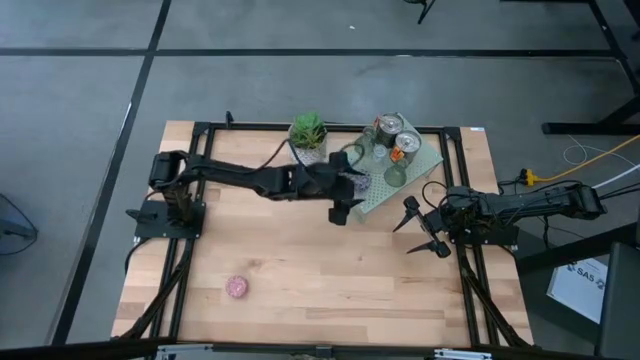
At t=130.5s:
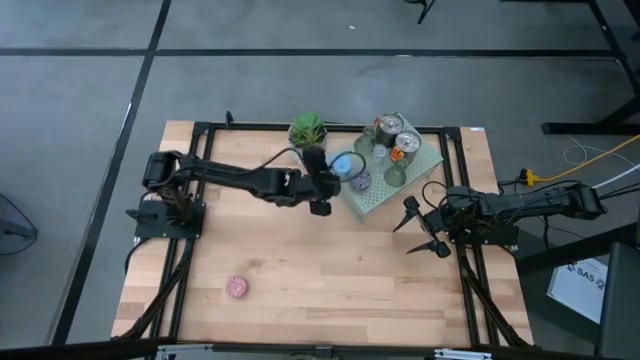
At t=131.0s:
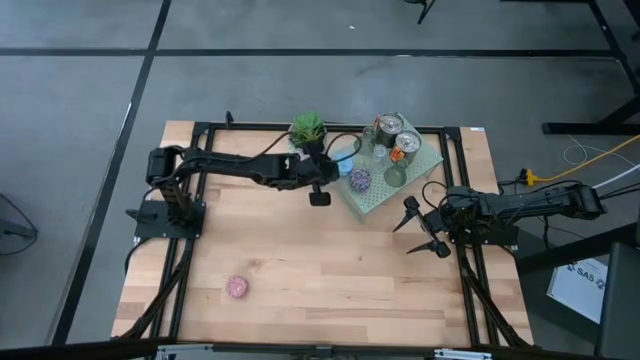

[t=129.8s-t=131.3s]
Task: Pick & Place candle stick holders
Adjust the blue scented candle on the shelf

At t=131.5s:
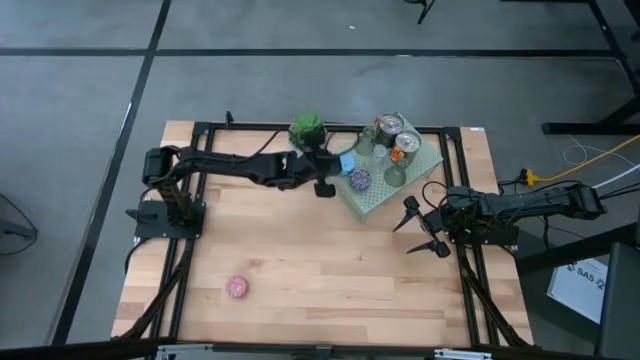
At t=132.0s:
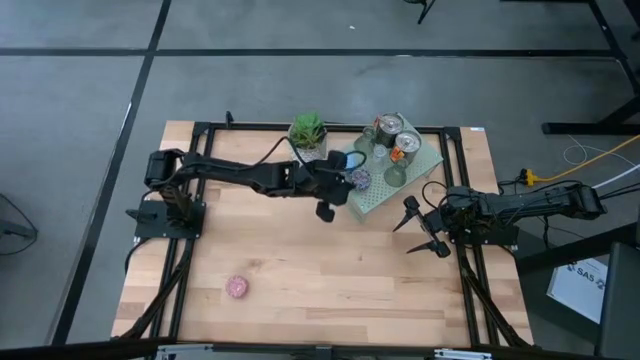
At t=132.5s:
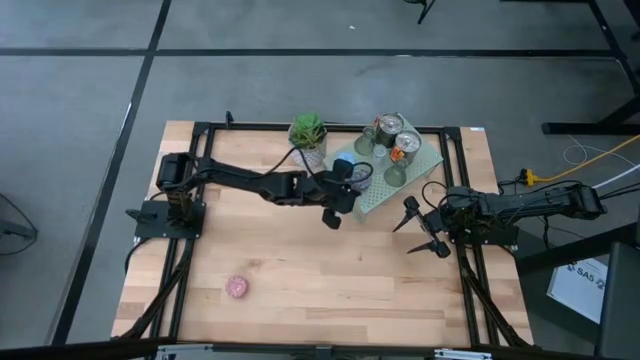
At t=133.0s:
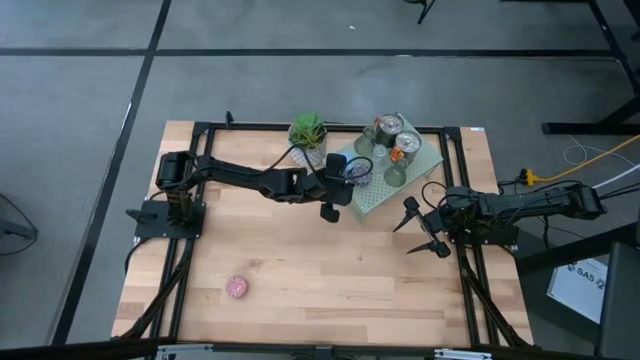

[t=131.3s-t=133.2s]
Adjust the black and red scented candle on the shelf

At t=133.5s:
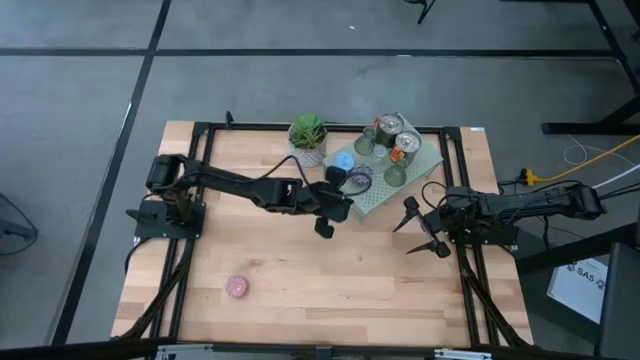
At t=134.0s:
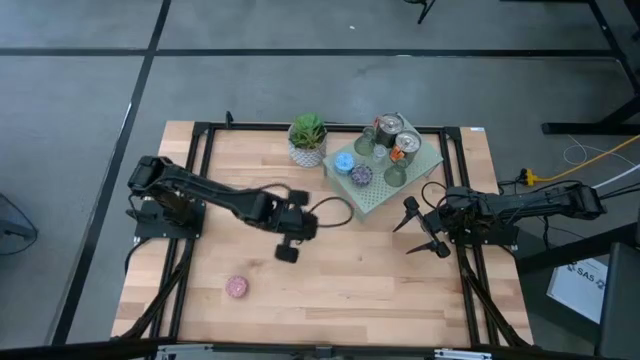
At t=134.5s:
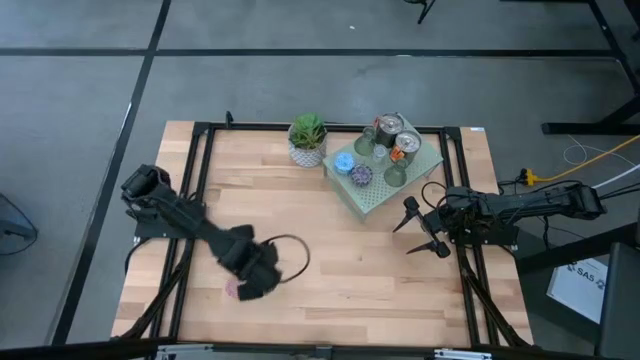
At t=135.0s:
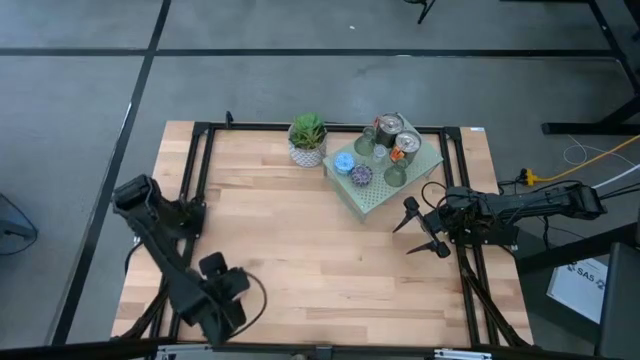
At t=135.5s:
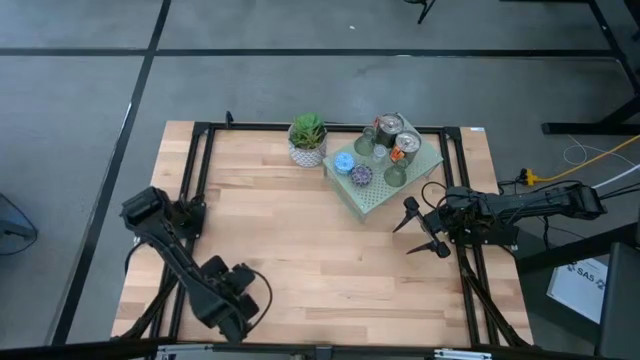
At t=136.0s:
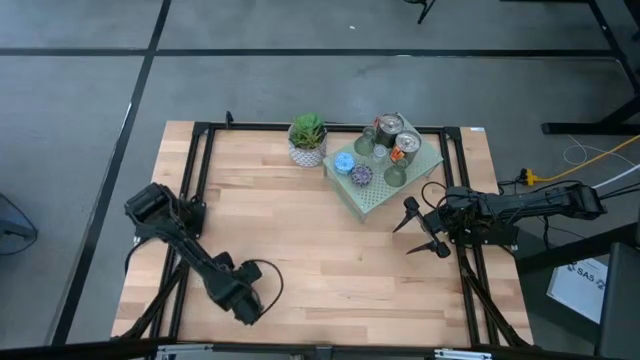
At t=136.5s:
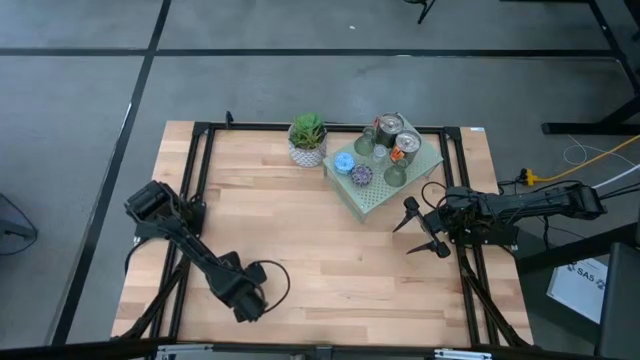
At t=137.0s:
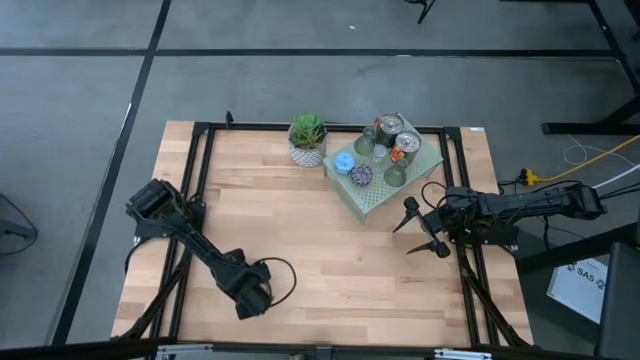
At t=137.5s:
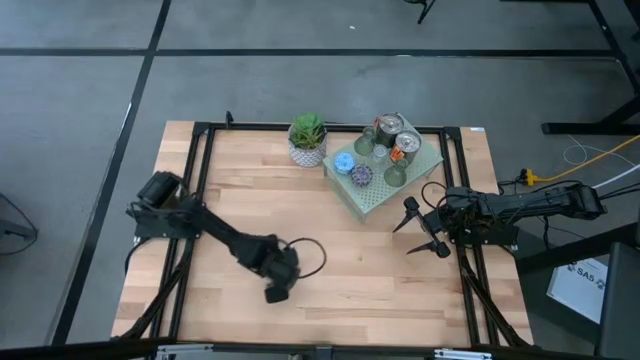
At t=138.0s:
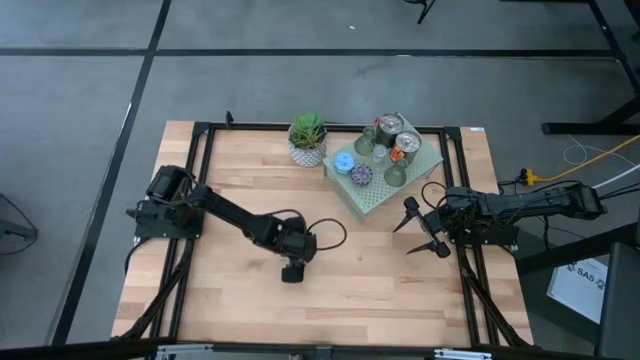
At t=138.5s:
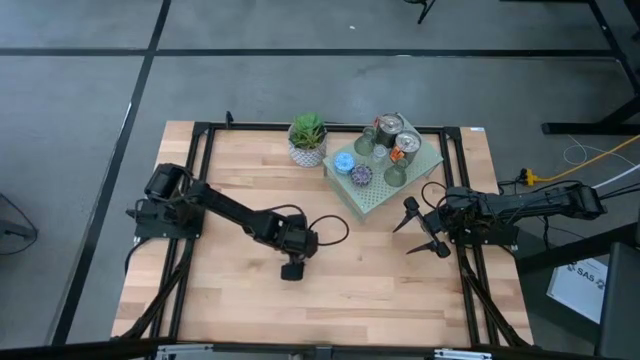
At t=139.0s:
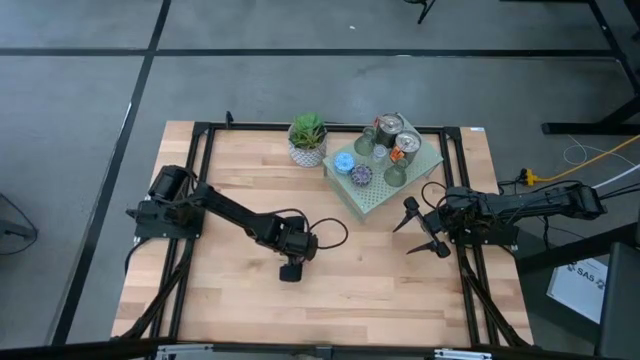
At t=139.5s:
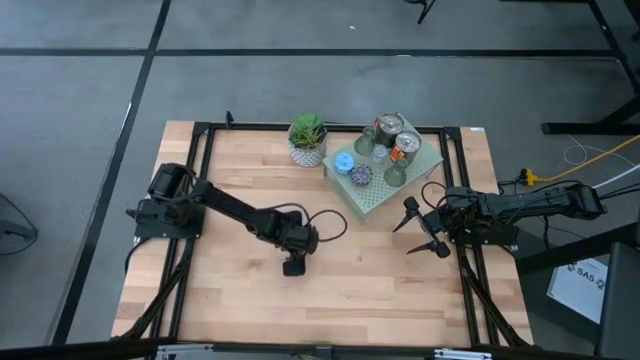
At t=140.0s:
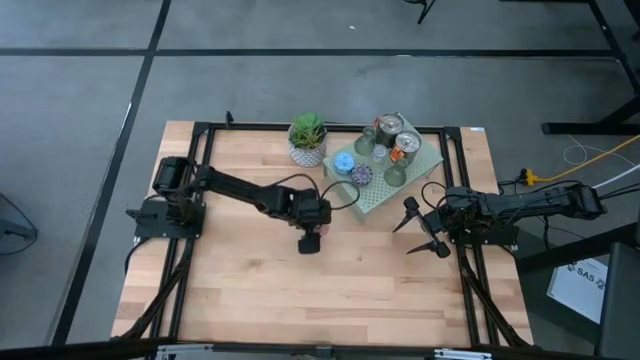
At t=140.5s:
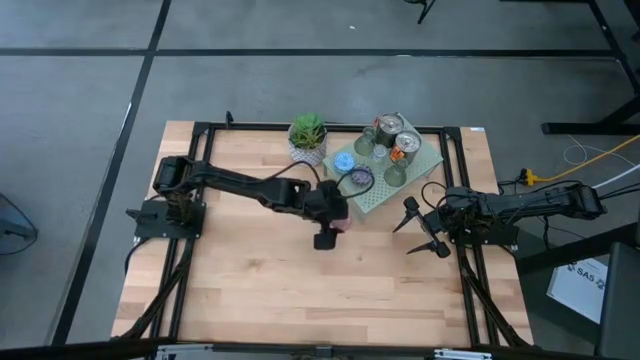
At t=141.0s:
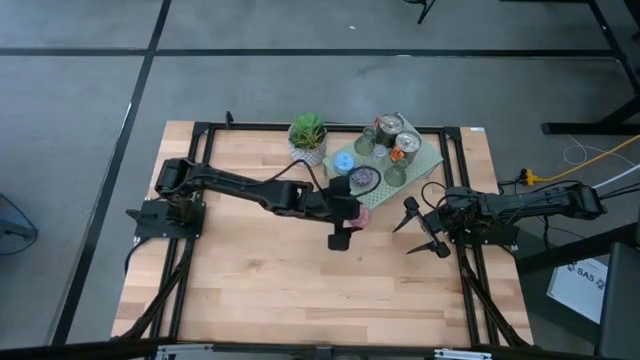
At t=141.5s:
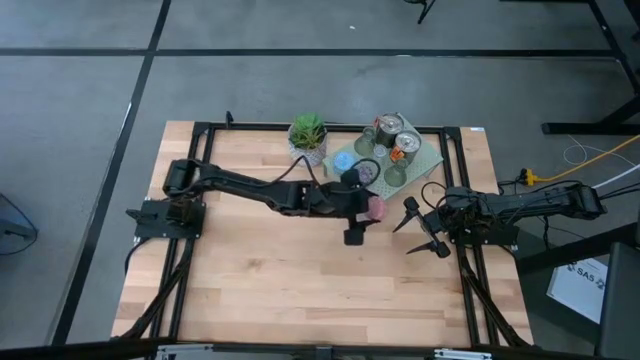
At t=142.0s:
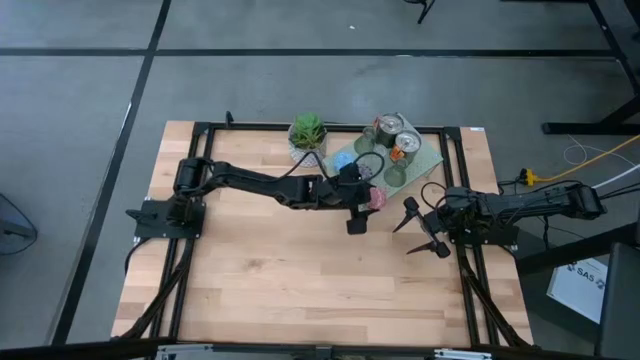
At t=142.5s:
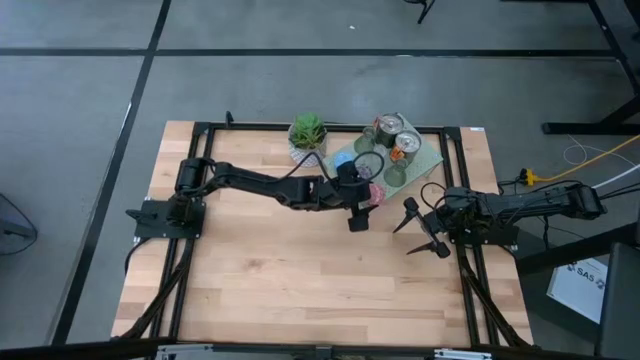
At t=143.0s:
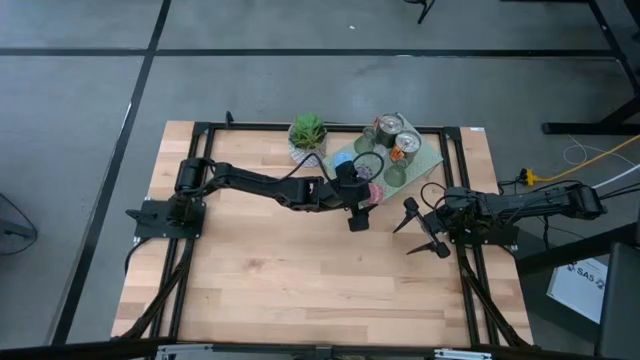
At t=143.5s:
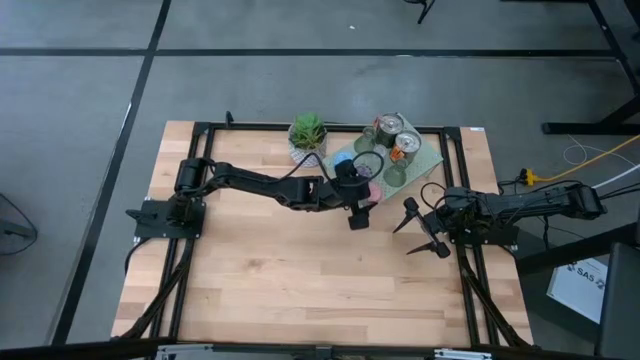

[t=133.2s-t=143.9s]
Align the pink and red scented candle with the other black and red scented candle on the shelf

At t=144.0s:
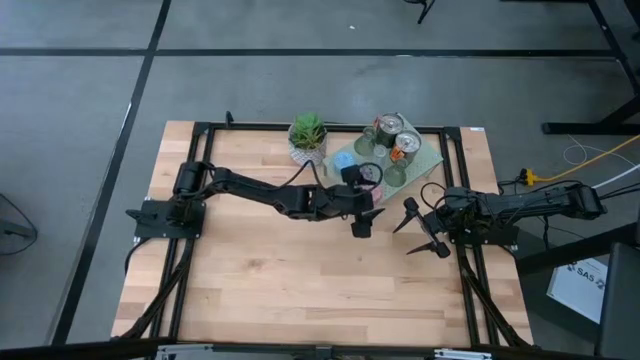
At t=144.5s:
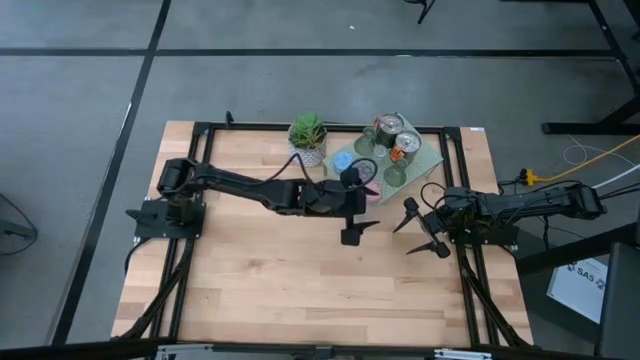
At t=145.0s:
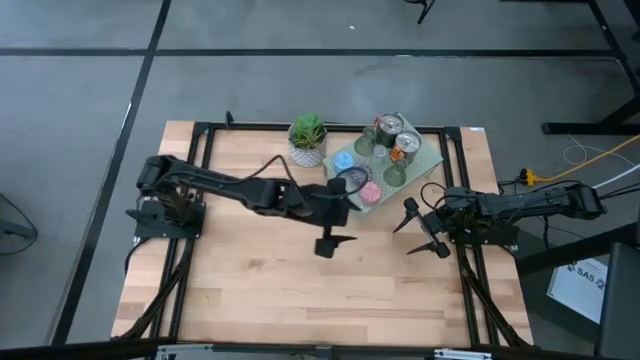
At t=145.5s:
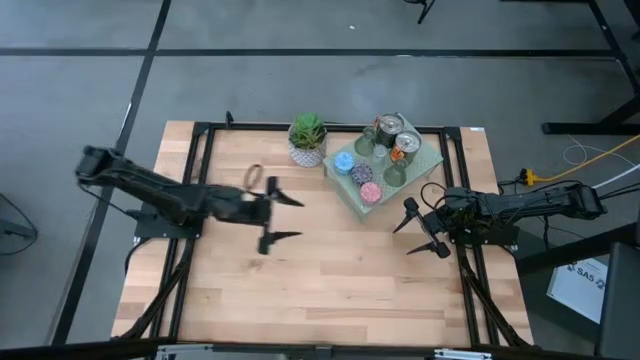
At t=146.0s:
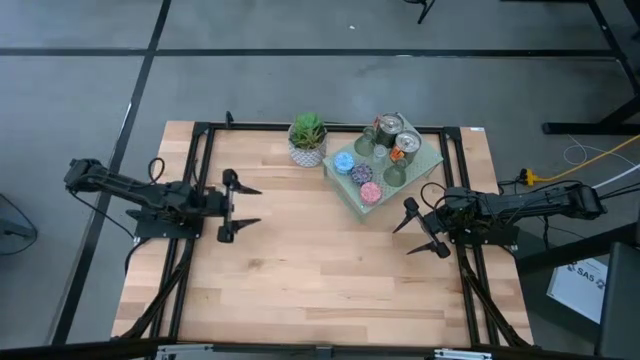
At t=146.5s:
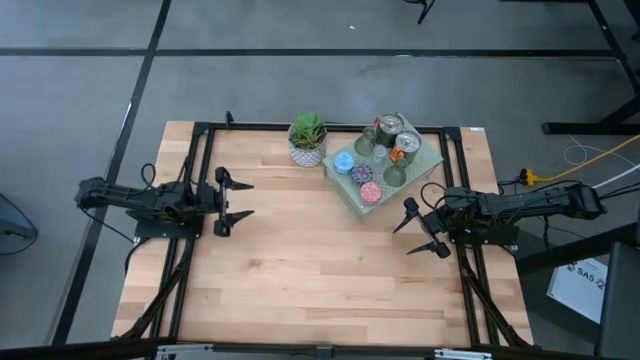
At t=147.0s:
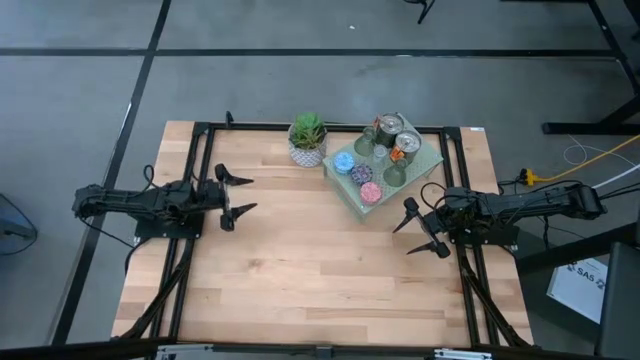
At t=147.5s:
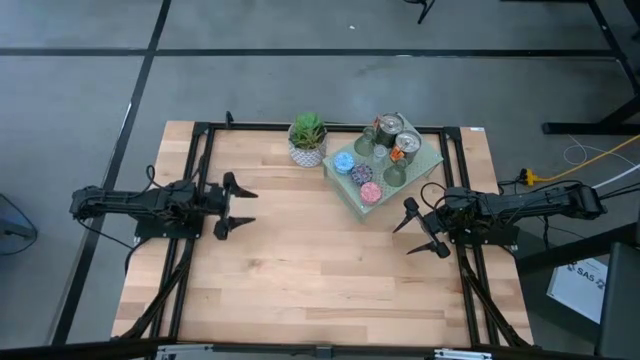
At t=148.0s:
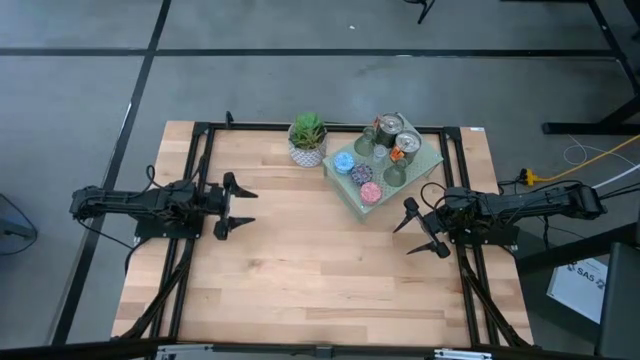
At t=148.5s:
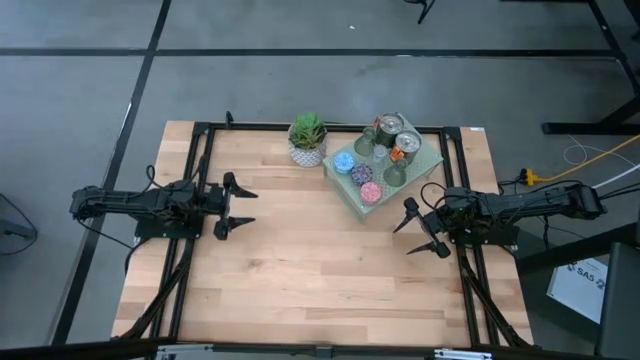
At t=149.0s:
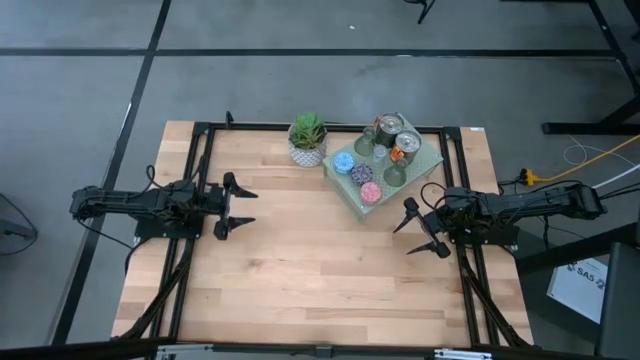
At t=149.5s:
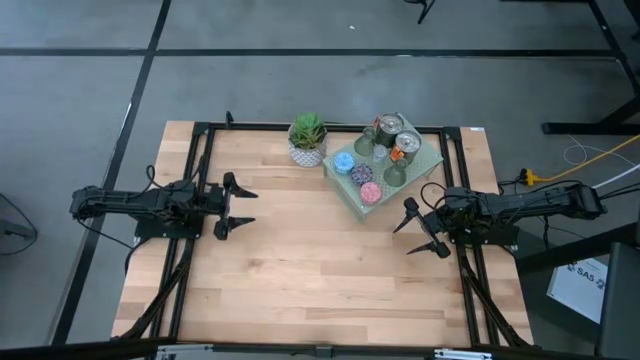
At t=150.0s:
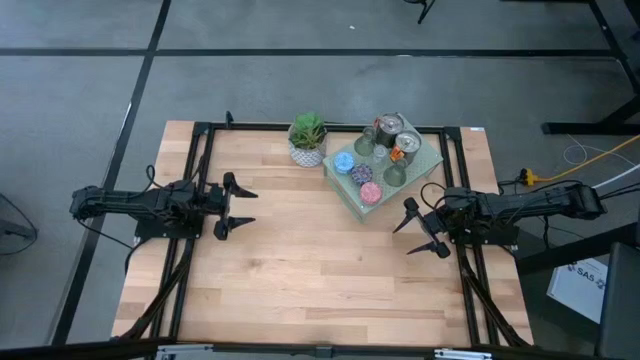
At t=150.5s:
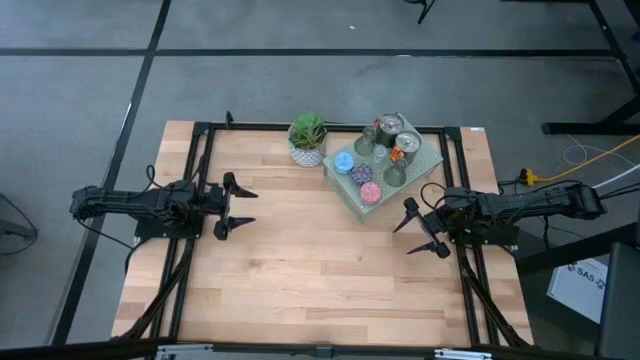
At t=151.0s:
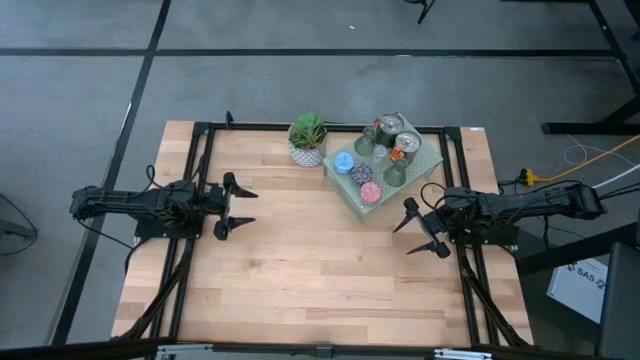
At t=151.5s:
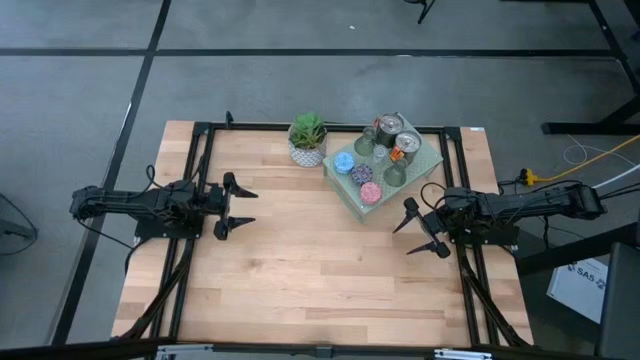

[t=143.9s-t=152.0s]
Return to Home Position
